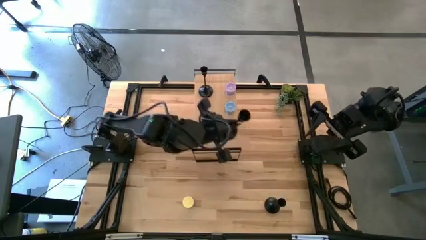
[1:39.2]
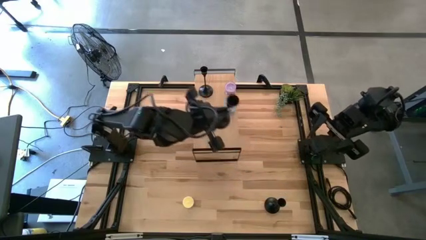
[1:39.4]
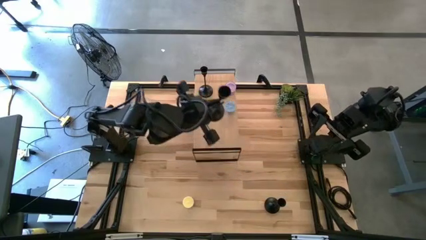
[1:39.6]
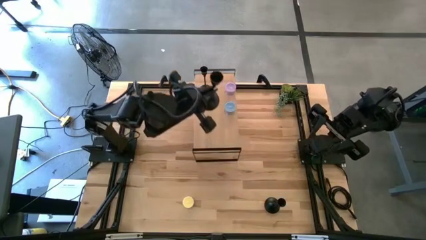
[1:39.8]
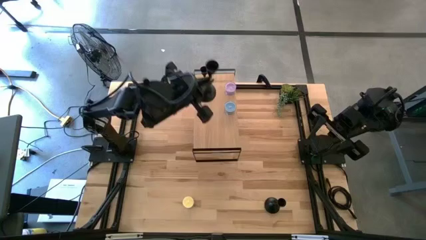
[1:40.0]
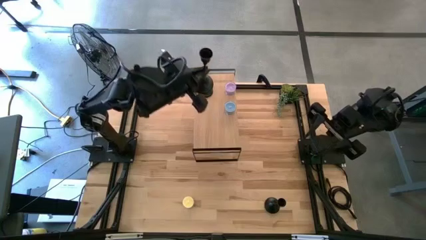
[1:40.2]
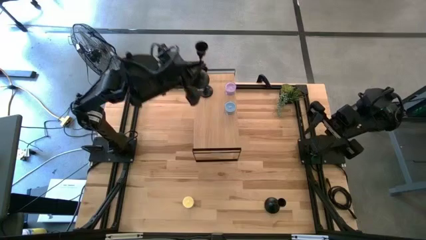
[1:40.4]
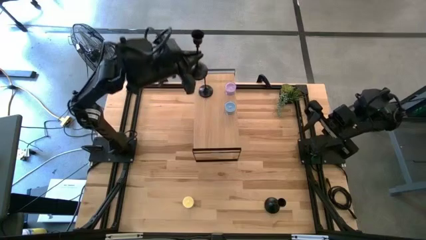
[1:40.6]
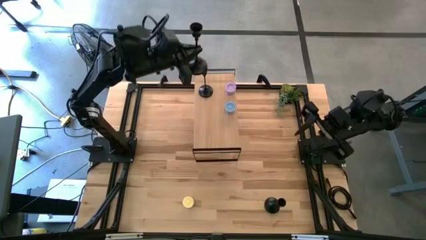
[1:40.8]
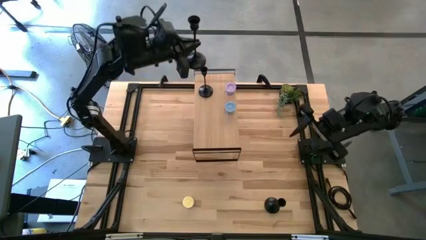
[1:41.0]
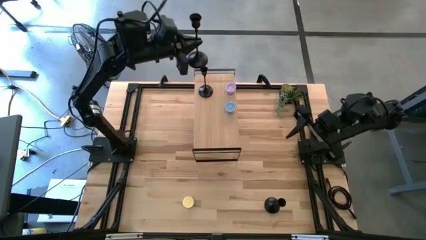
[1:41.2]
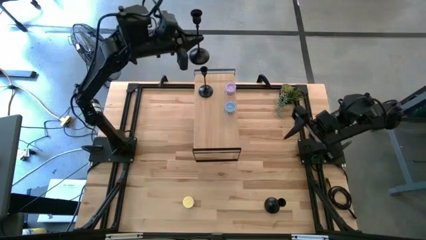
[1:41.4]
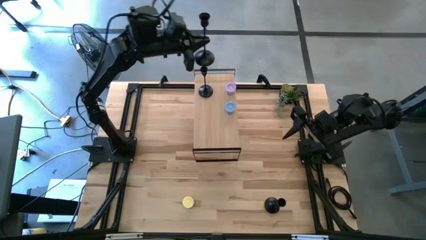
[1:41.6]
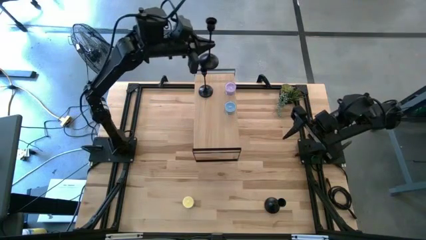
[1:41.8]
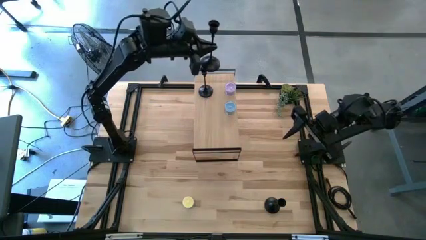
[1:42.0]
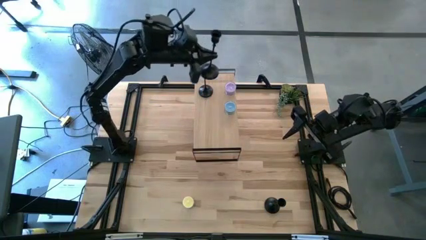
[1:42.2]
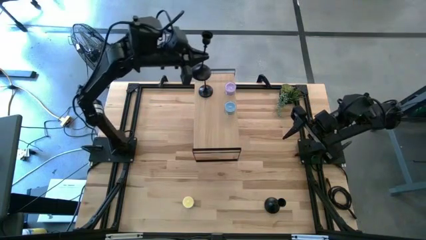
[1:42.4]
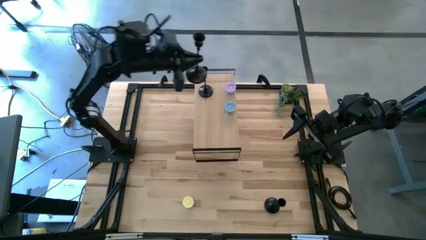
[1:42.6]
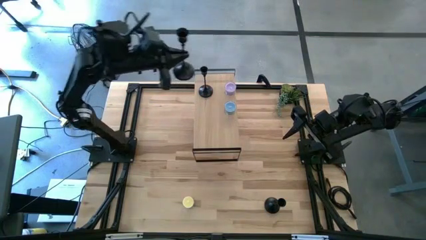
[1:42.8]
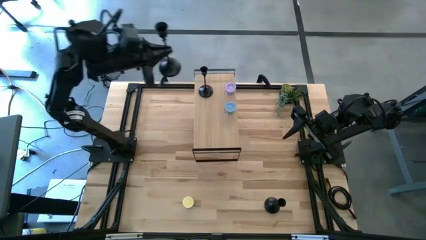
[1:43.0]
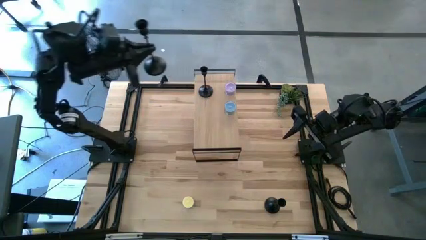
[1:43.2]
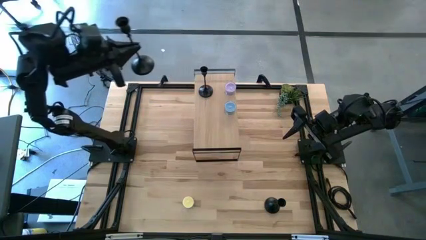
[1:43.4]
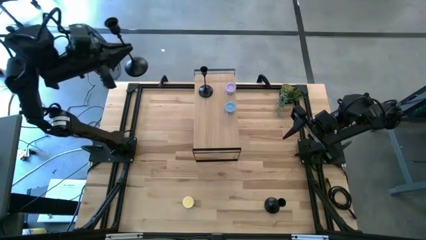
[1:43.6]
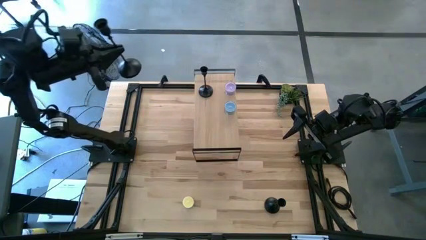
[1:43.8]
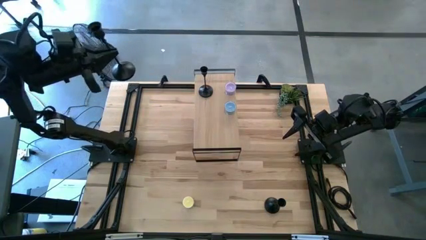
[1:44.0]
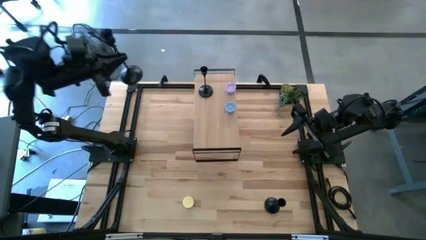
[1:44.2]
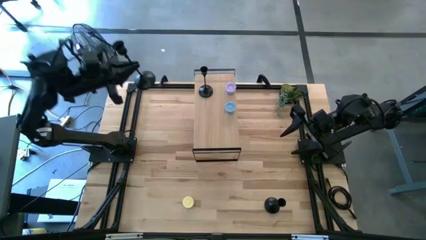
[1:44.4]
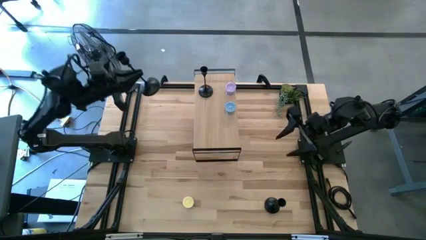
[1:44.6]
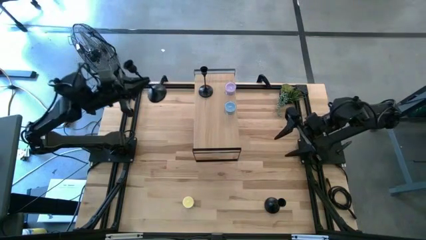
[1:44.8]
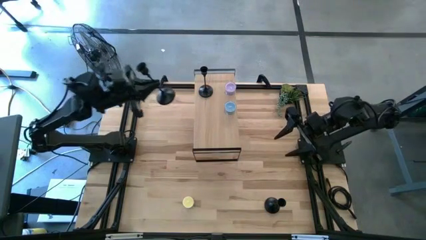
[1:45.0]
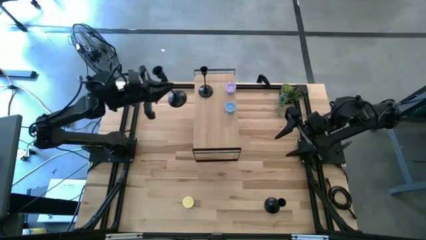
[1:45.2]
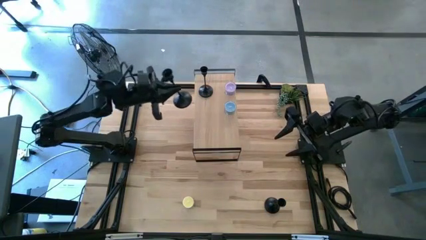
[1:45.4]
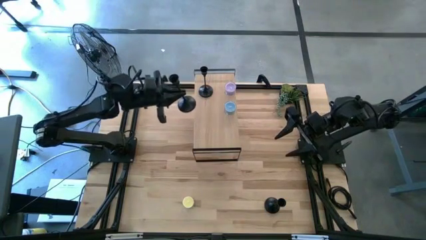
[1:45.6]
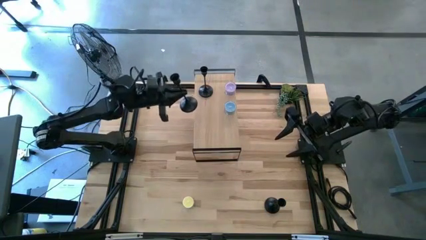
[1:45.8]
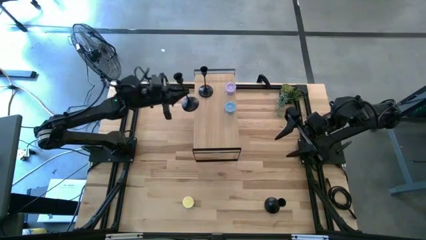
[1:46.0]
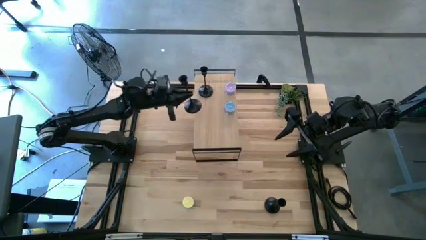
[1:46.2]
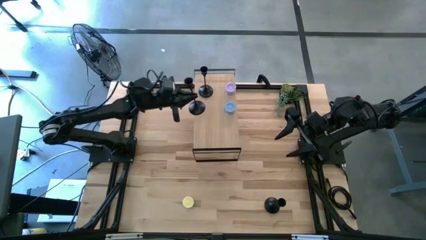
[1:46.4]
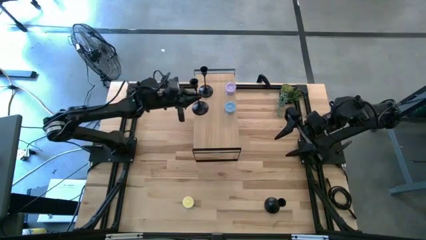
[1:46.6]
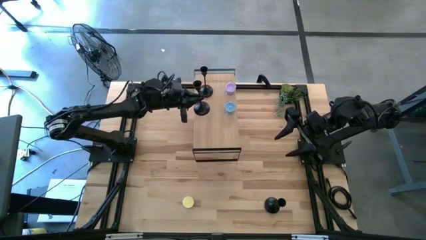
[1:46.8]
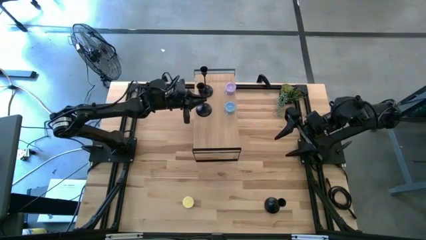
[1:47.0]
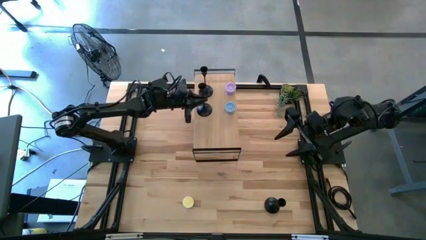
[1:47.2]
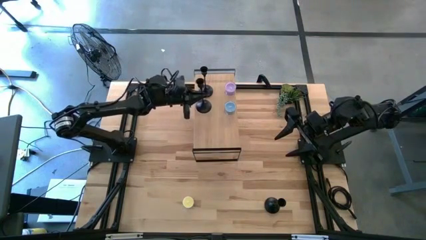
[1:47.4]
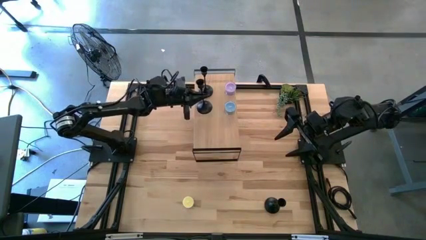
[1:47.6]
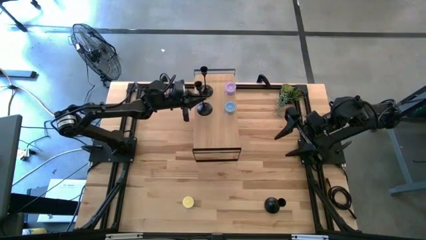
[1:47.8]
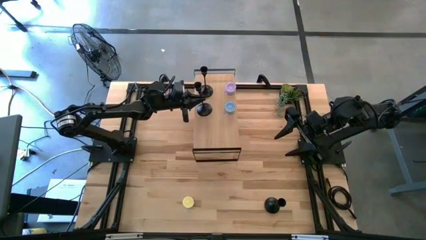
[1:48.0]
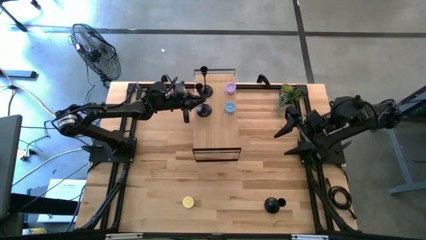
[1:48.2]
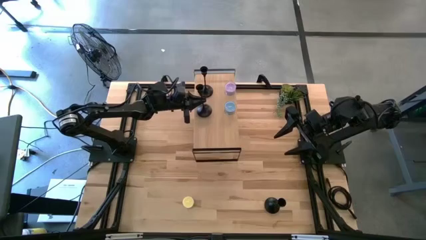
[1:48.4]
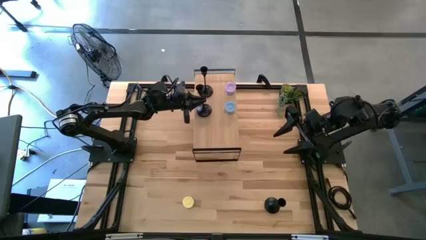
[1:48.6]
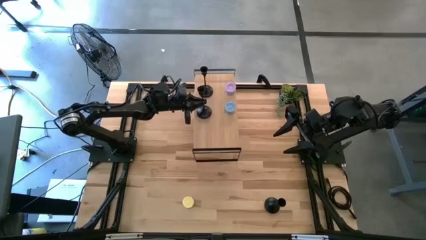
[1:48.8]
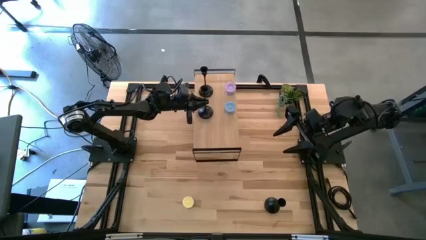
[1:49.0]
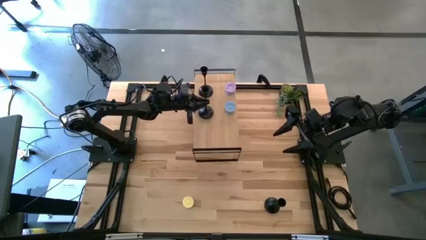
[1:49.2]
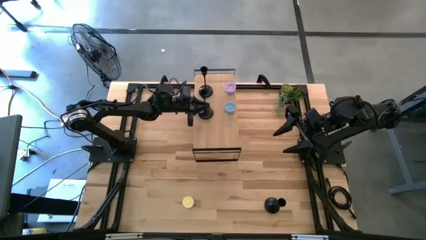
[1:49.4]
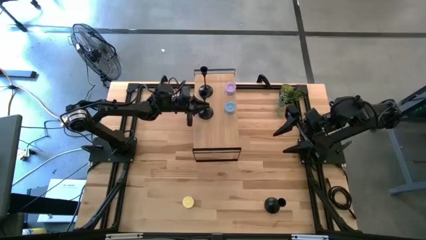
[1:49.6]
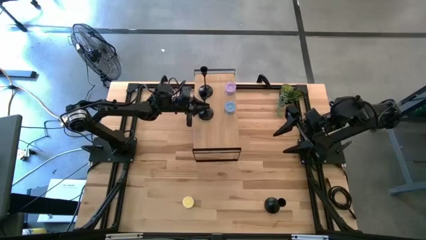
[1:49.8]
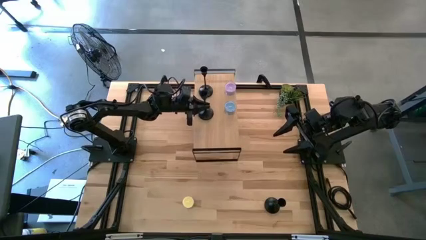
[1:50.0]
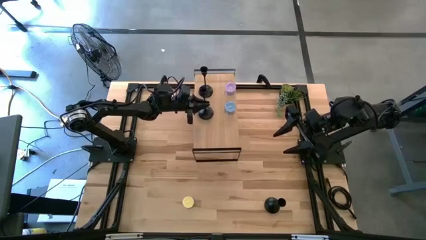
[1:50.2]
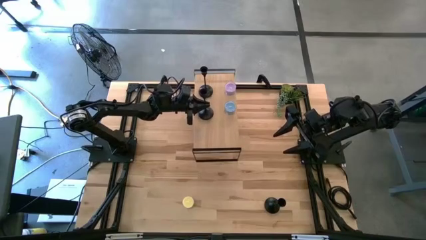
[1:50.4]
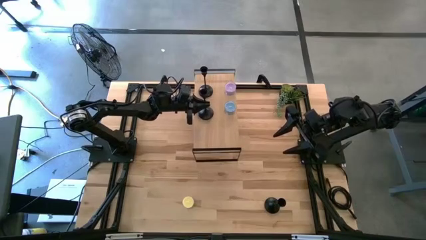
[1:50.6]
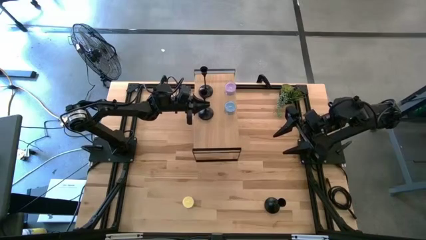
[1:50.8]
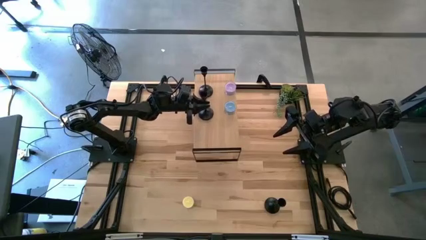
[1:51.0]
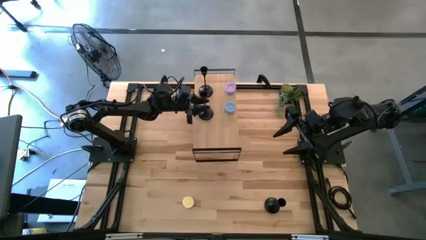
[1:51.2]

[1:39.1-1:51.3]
Task: Pick & Place candle stick holders
Put the left black candle holder on the shelf

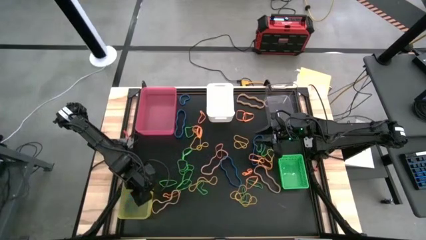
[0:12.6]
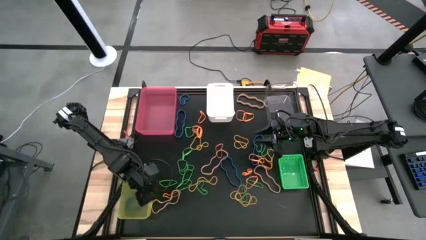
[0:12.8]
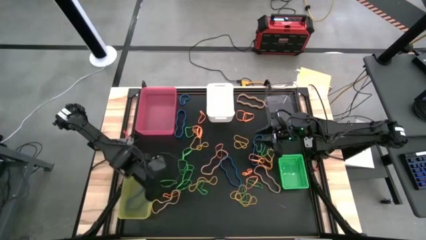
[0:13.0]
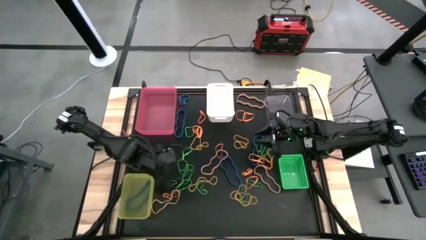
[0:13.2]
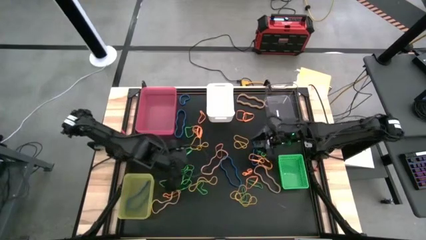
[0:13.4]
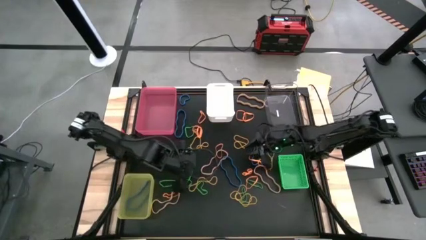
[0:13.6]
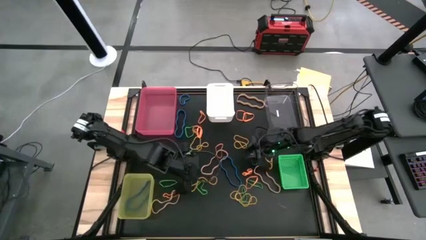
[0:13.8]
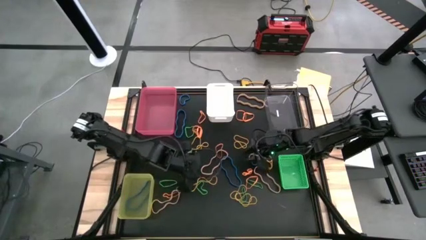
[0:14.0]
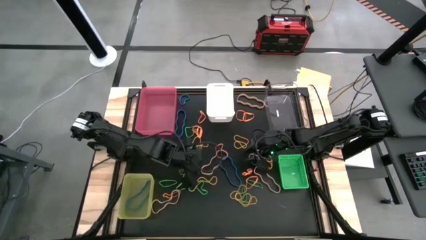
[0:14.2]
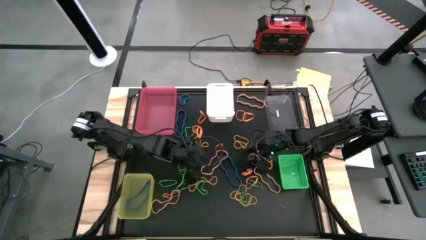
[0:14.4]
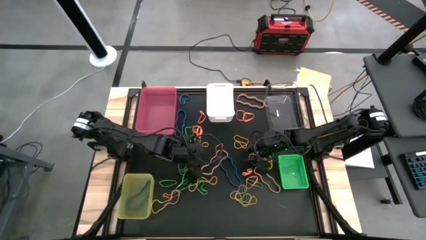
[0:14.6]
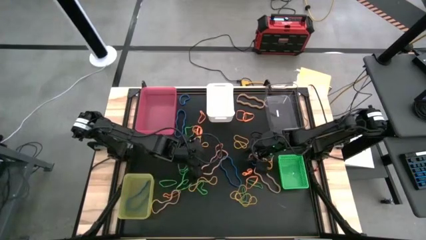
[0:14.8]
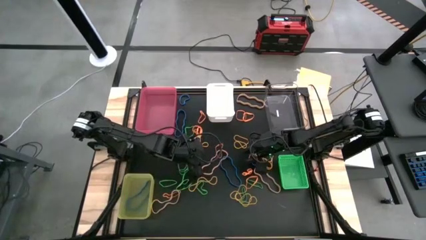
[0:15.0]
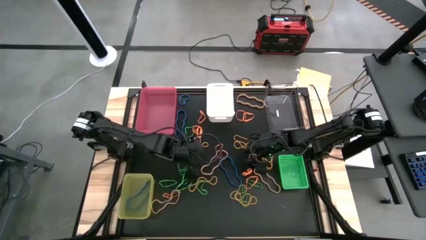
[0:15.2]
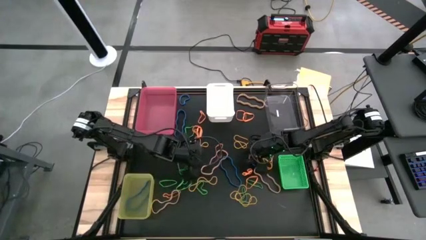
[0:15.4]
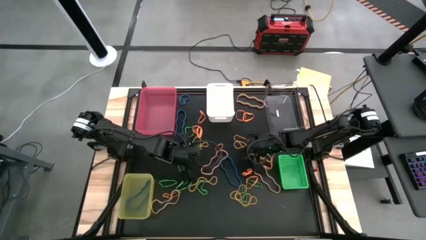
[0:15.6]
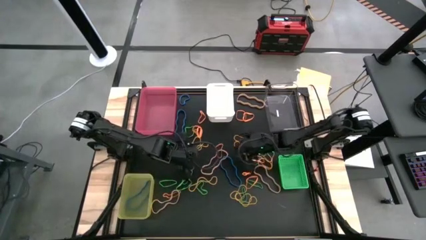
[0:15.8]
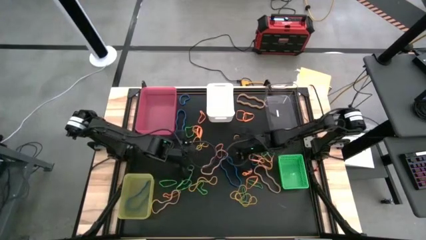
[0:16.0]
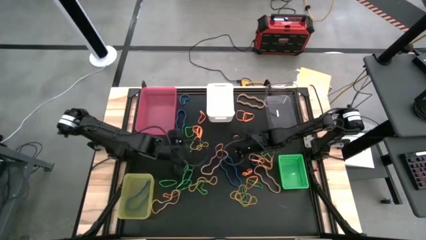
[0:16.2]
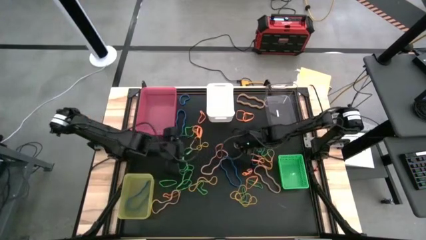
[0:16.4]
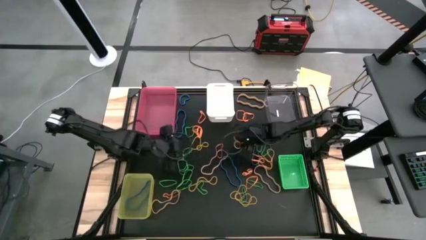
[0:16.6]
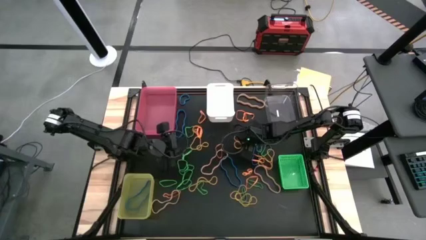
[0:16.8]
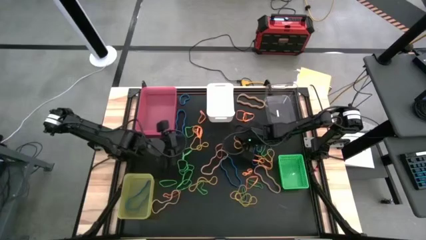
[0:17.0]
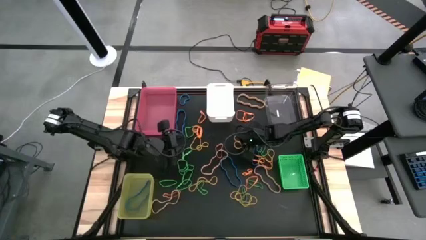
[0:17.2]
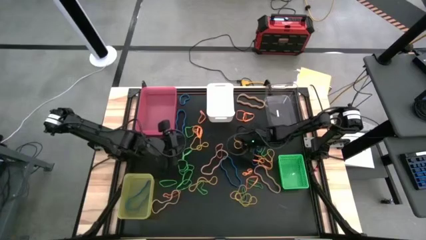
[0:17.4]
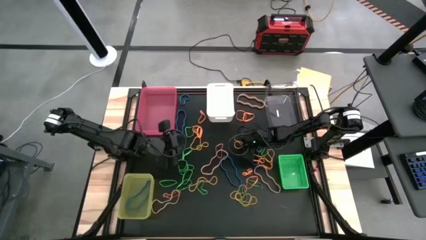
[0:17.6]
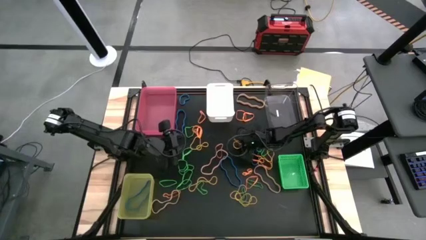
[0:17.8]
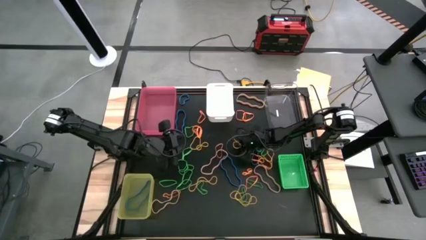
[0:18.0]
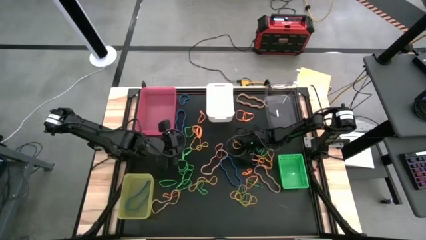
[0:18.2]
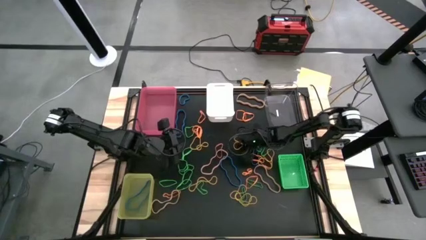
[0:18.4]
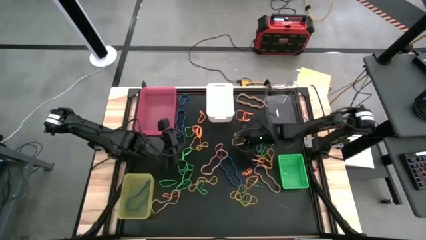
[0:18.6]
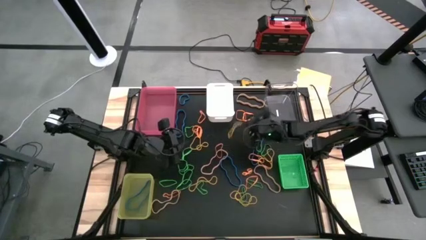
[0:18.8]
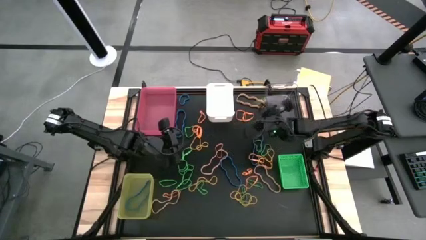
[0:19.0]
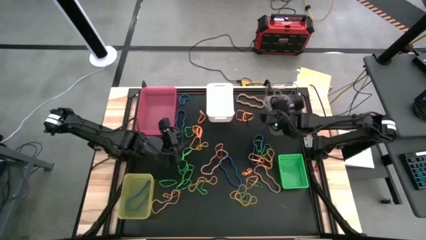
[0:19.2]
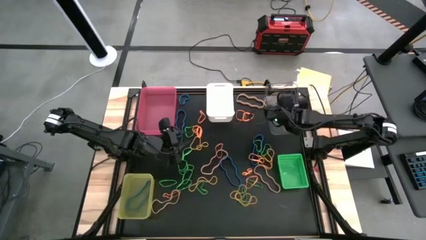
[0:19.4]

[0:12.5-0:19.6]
Task: Sort rubber bands into baskets
Put the yellow rubber band into the transparent bin
